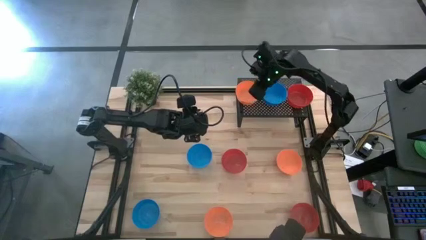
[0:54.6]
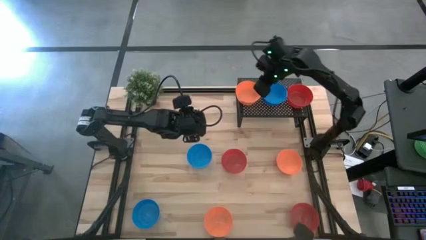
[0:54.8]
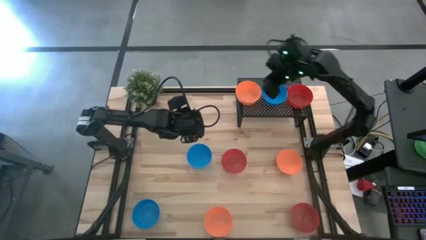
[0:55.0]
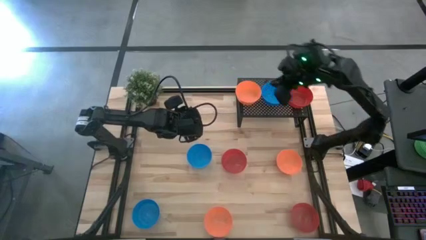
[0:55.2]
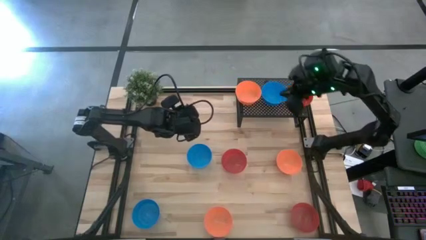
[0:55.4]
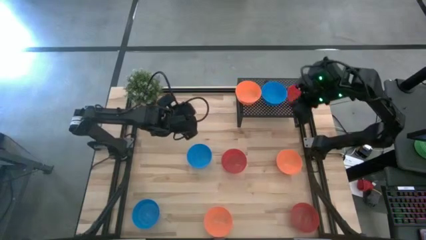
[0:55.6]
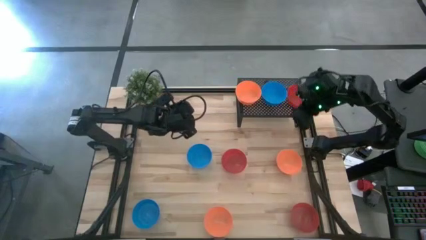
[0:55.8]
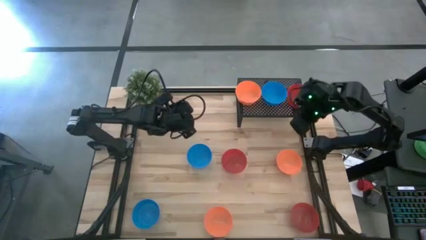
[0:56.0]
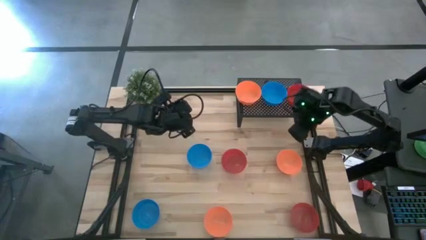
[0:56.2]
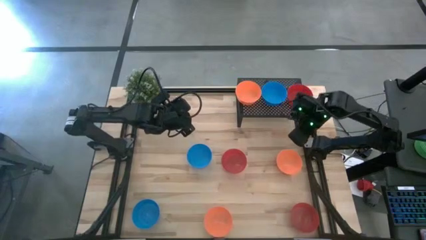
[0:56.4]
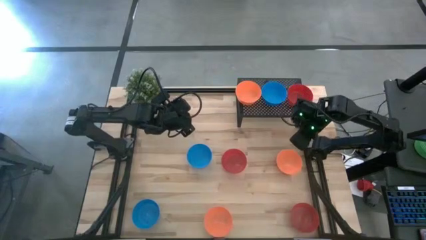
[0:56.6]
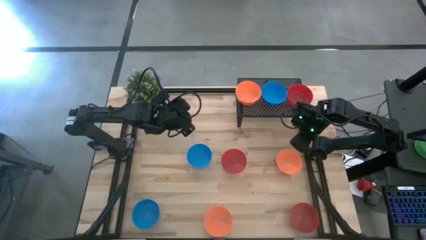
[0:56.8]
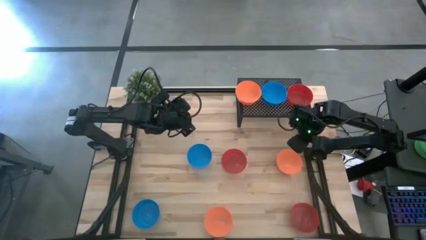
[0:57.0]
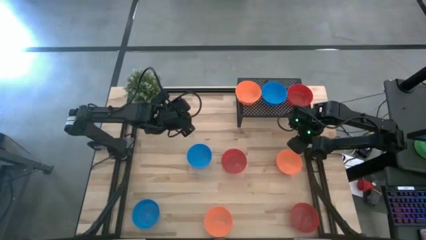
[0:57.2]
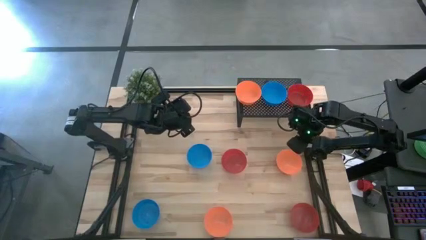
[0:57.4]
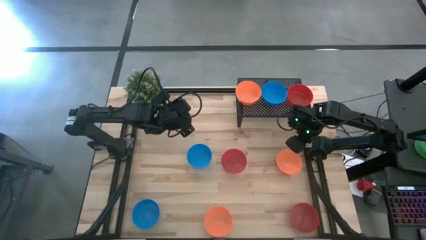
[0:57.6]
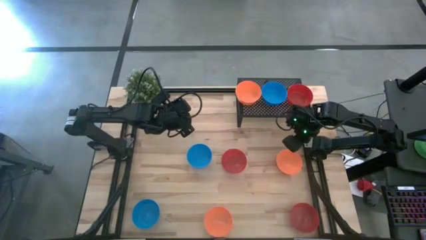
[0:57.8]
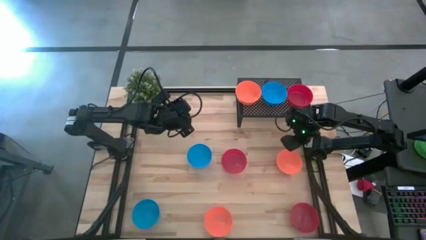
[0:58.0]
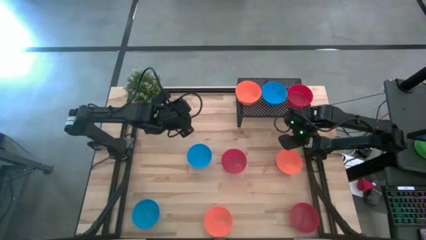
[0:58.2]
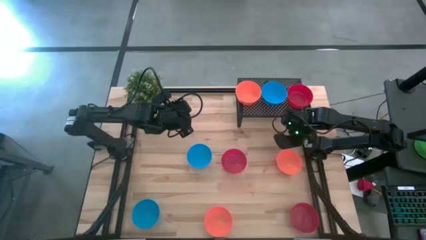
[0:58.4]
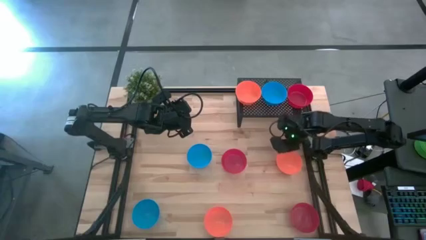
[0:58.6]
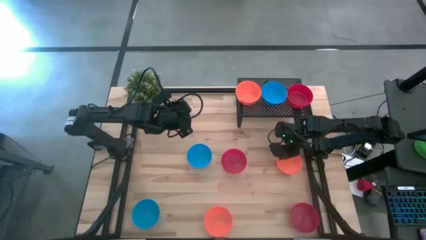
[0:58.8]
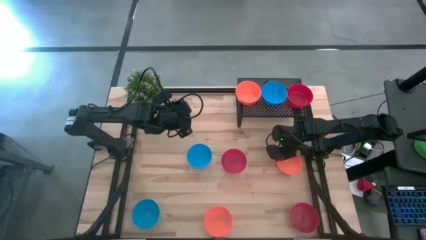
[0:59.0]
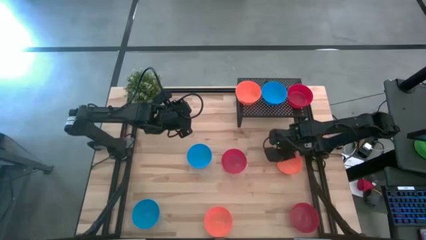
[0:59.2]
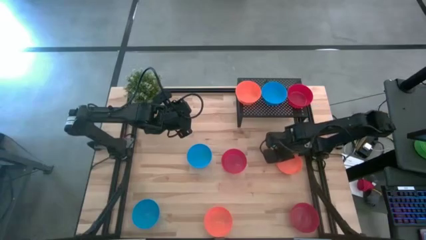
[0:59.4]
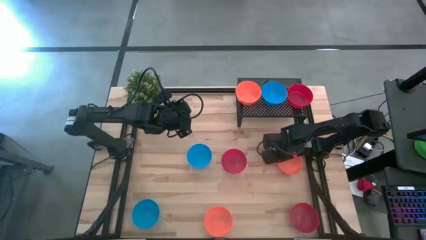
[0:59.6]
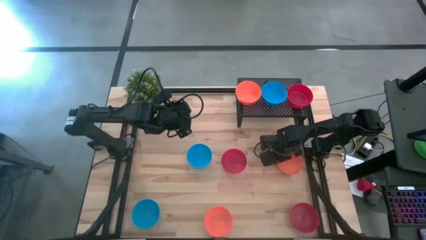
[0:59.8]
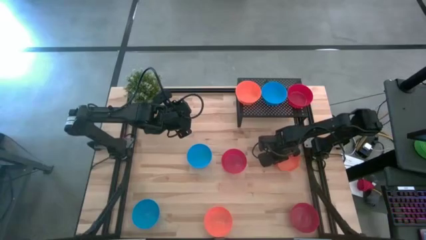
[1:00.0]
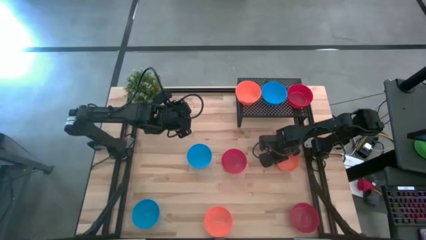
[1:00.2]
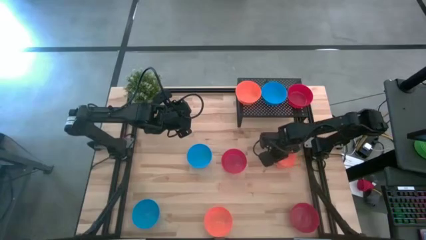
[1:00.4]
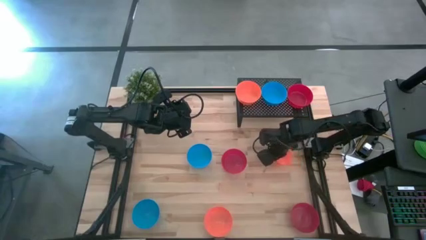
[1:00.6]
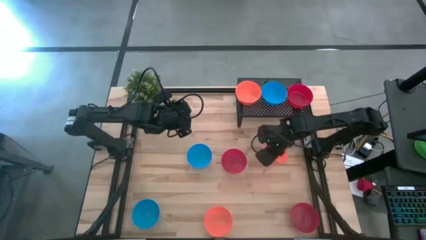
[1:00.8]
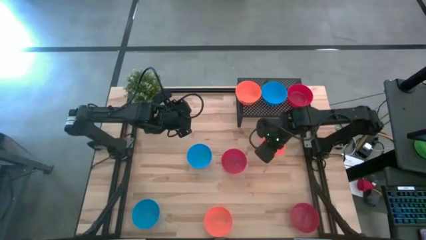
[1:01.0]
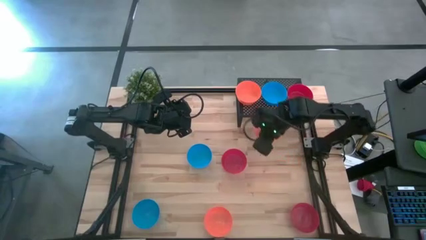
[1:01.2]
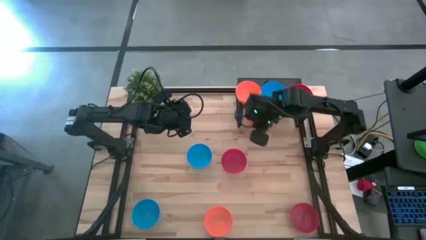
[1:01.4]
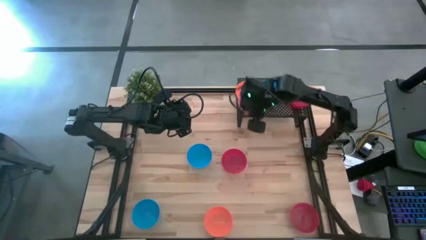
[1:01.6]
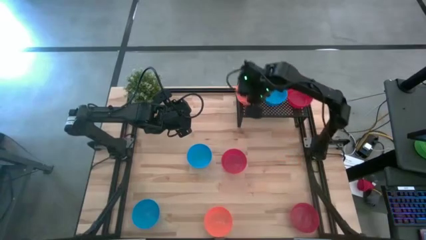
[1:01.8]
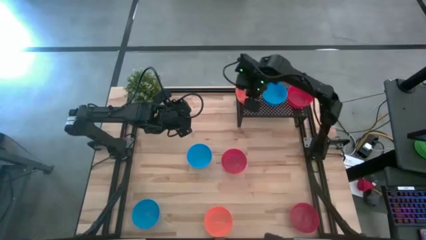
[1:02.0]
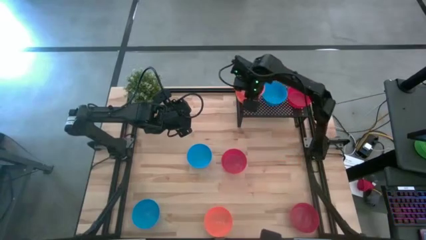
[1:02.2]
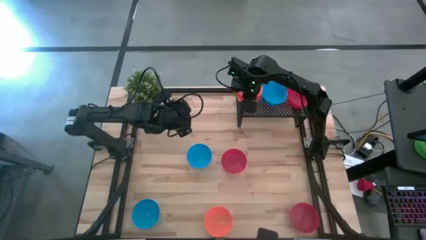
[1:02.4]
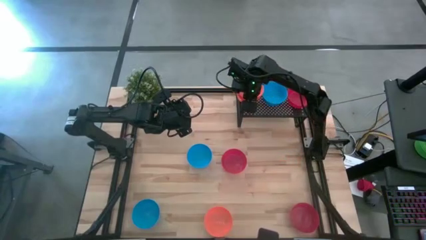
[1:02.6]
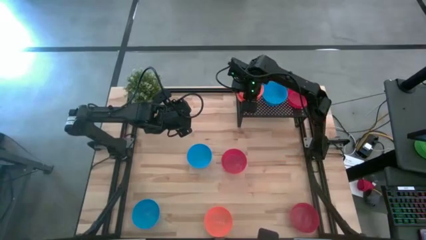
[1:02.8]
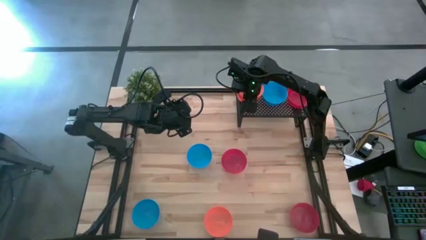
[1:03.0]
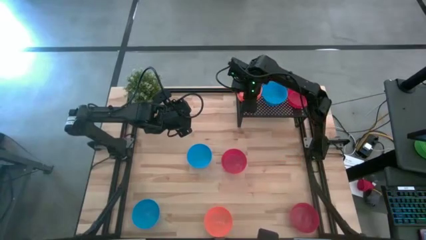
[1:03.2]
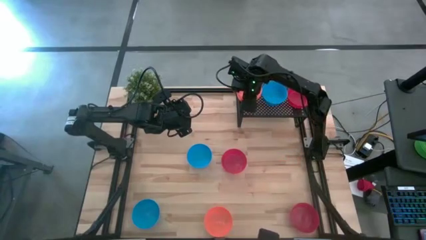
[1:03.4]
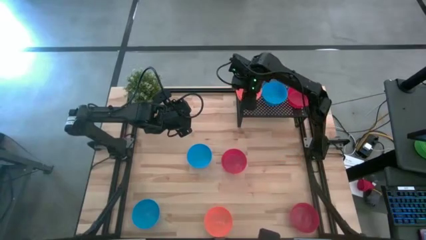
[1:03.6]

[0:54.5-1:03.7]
Task: Pick & Place Mini bowls
Stack the right orange bowl on top of the orange bowl on the shelf
